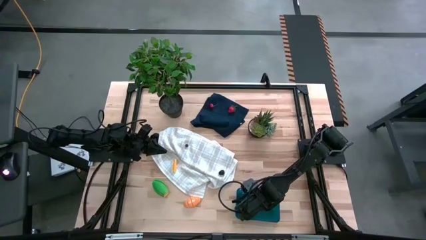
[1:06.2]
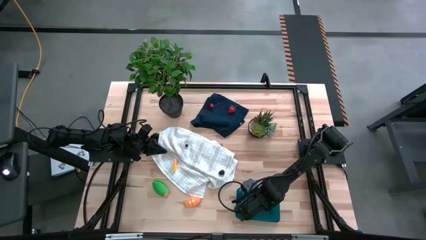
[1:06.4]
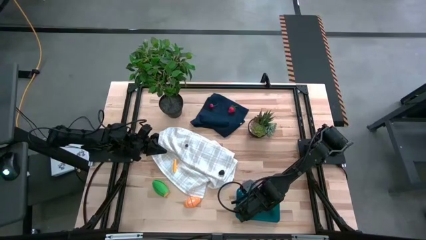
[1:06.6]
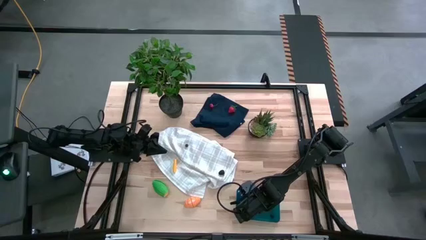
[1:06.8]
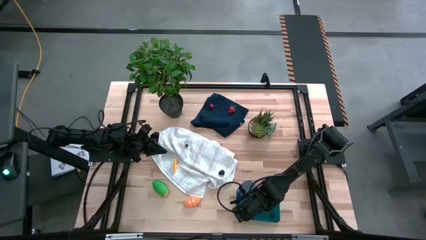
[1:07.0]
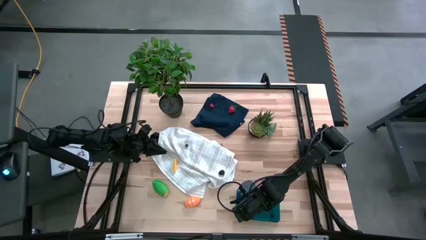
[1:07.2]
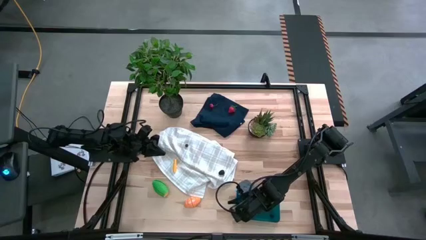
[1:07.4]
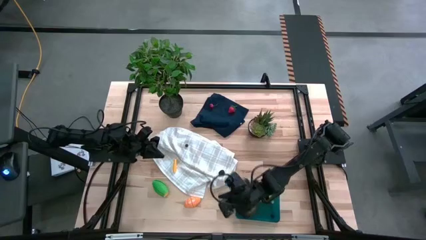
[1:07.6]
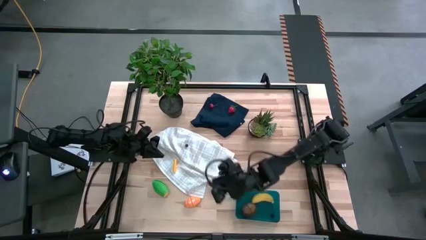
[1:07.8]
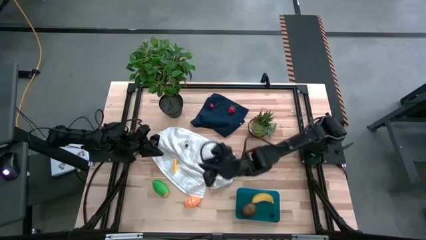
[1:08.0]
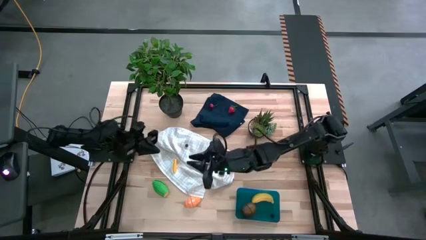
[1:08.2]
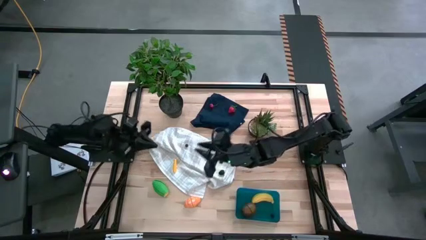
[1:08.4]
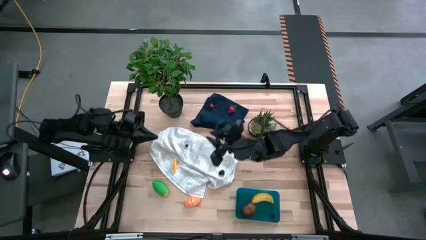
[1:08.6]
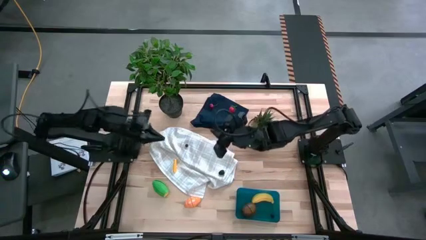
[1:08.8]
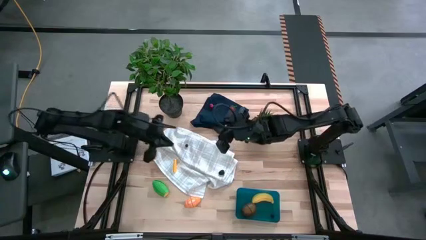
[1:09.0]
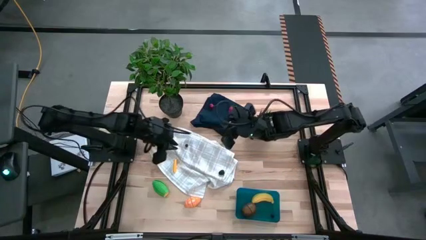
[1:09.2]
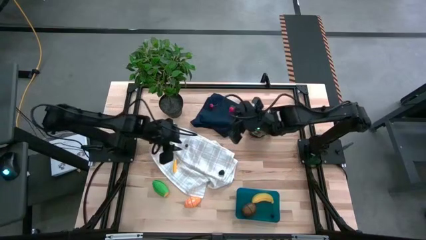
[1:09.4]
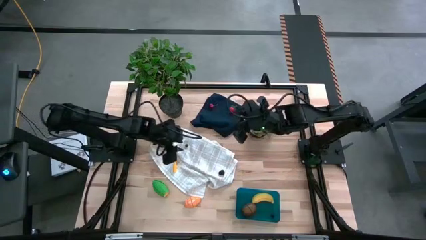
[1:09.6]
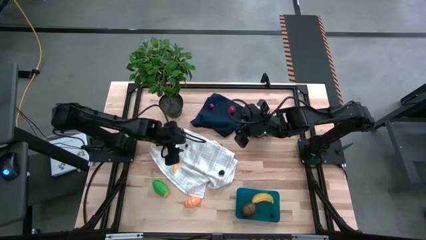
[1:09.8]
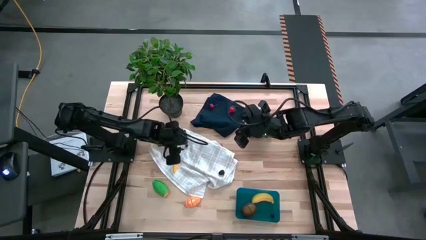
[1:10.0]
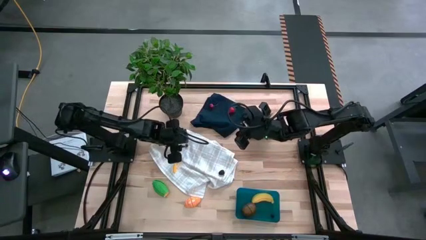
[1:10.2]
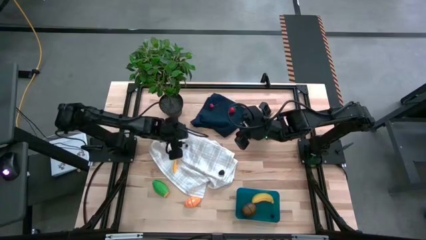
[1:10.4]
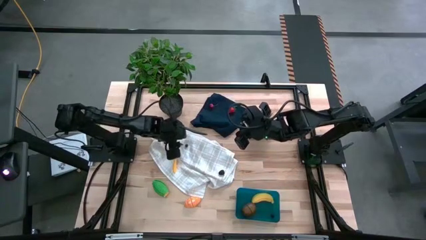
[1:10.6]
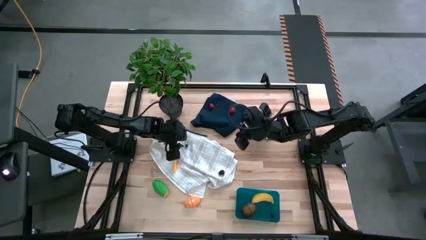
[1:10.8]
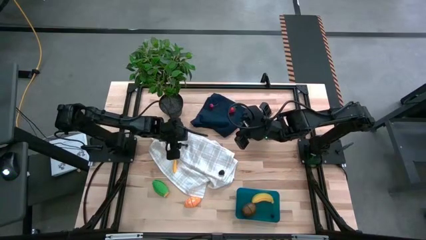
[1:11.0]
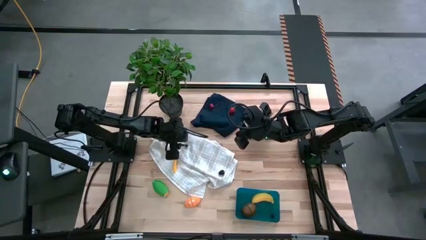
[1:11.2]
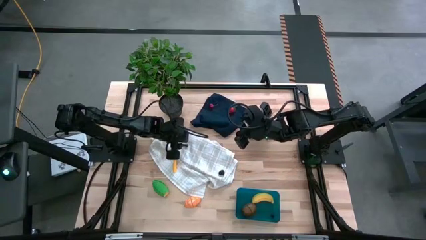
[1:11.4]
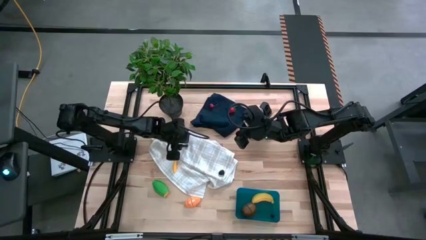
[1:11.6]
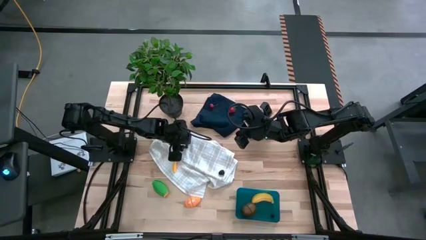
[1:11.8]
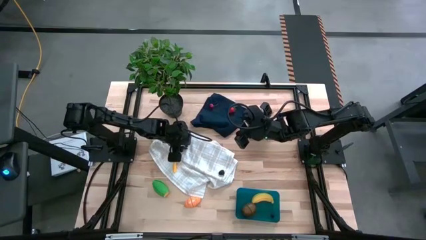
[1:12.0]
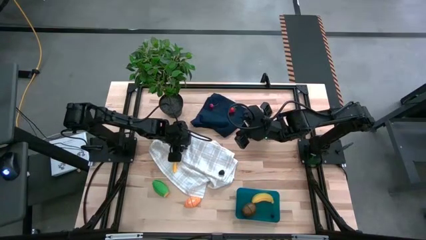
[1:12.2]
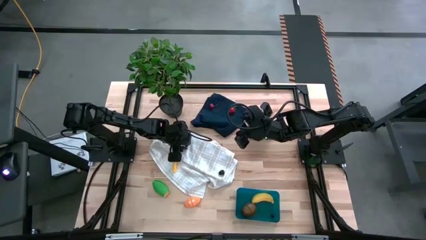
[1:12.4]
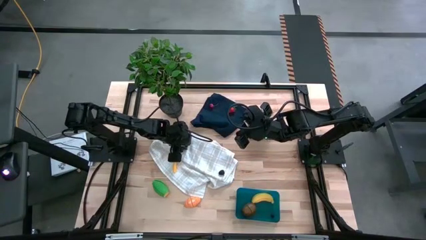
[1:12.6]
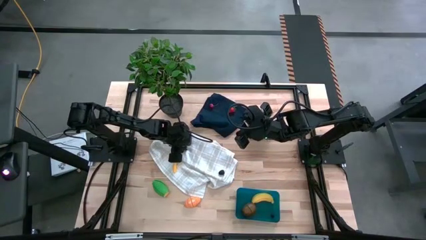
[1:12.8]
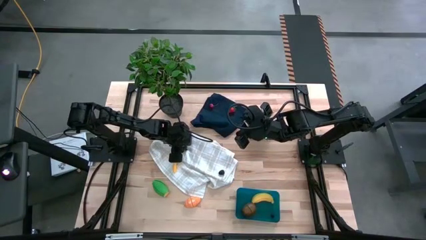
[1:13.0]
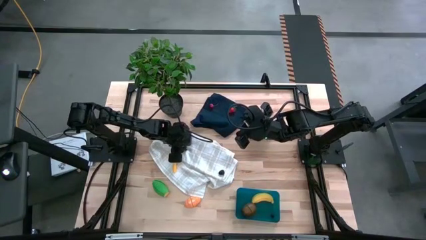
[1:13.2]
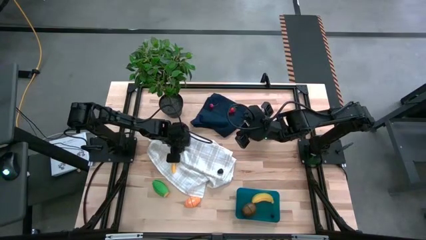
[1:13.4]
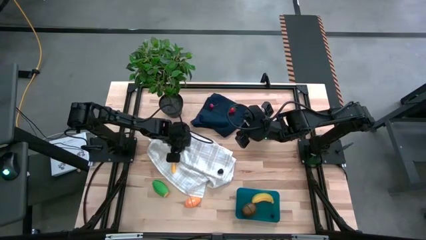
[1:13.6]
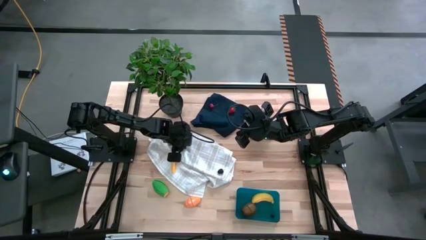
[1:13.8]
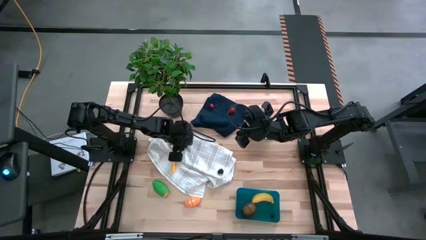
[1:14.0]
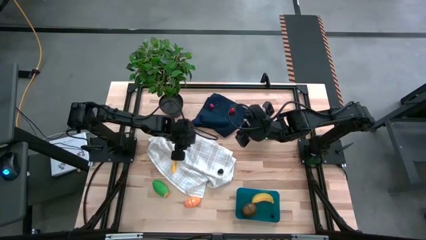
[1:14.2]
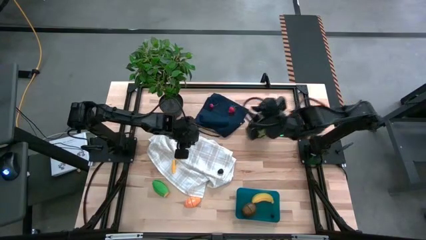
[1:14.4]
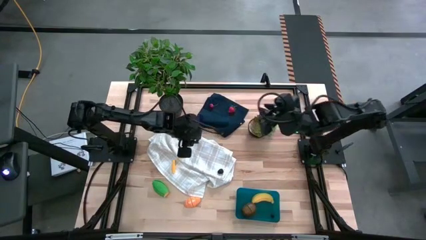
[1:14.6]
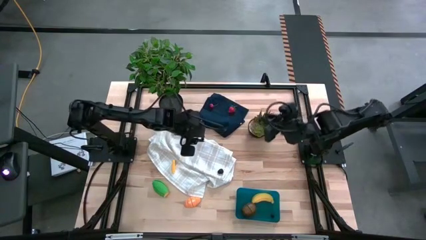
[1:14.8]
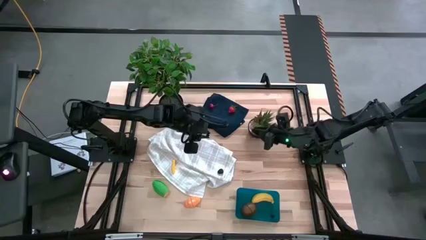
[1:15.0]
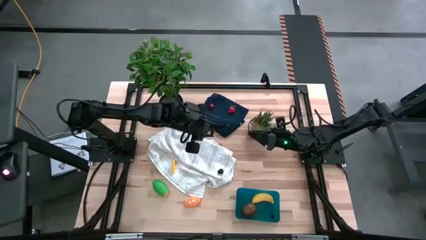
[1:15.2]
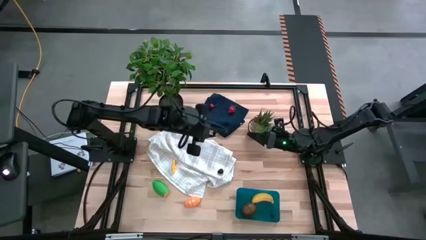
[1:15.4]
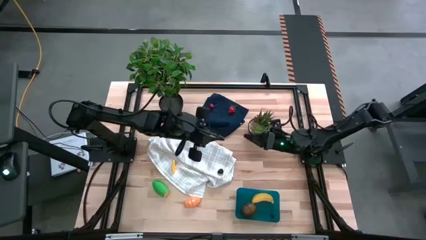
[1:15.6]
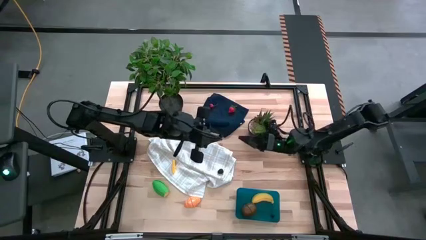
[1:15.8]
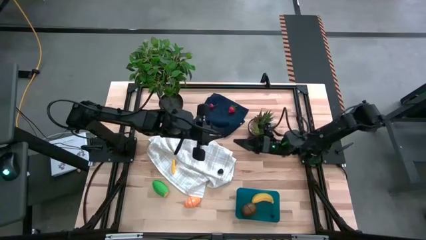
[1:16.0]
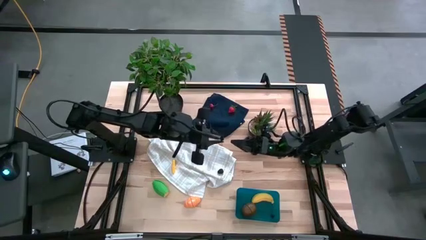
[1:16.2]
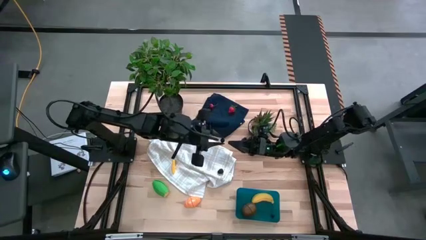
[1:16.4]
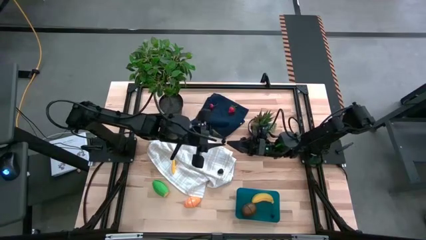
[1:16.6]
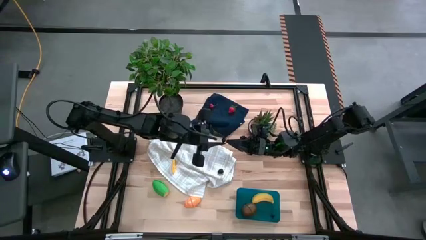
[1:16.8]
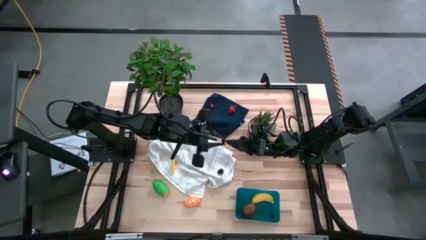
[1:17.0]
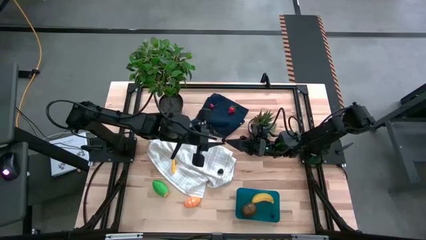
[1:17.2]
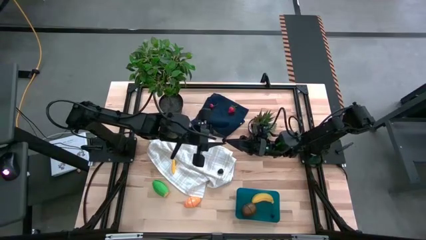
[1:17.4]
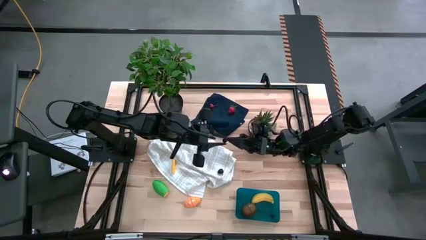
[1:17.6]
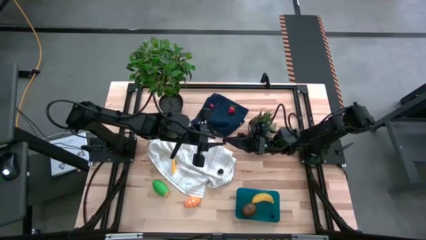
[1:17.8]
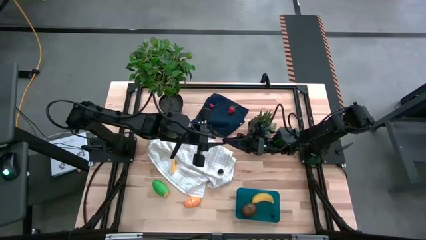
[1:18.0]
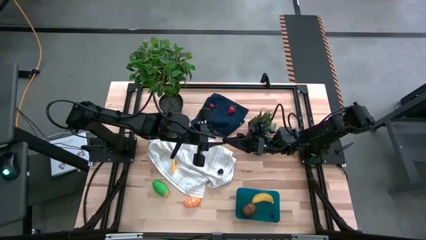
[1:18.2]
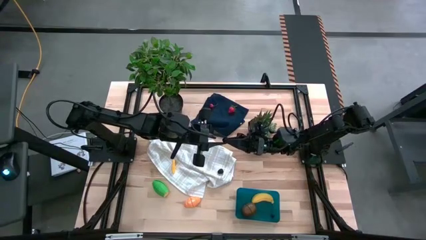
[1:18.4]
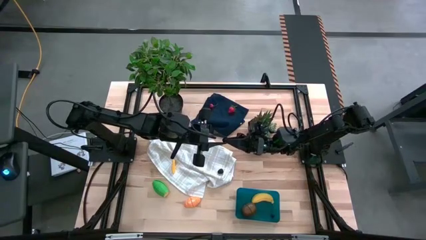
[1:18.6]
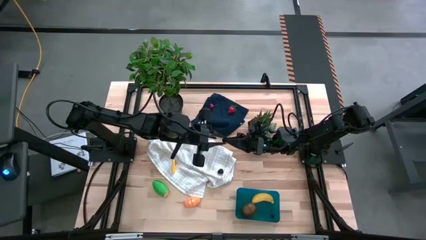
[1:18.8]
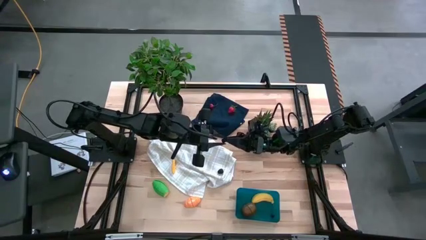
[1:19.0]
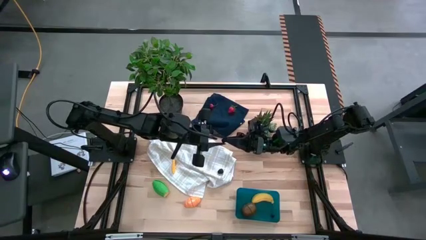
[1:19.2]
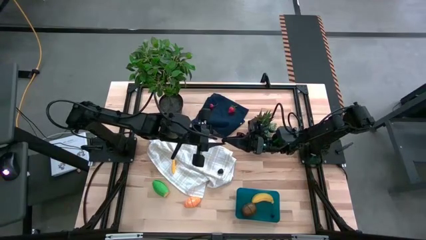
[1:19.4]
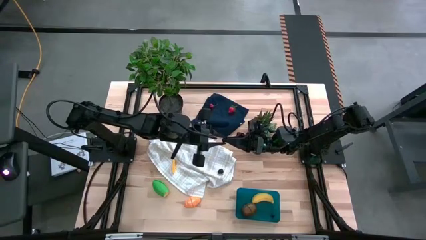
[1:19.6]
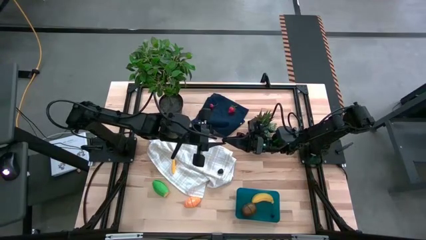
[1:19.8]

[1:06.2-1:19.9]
Task: Pick and placing Produce into tupperware
Put the blueberry into the bin

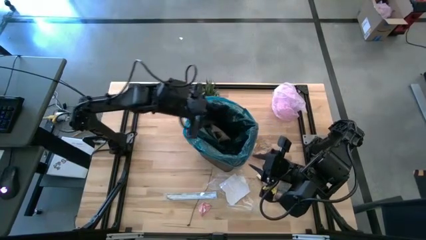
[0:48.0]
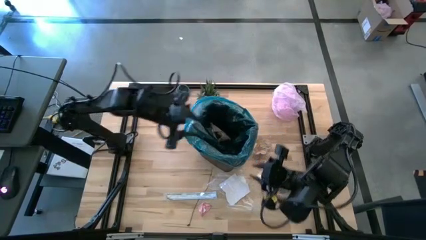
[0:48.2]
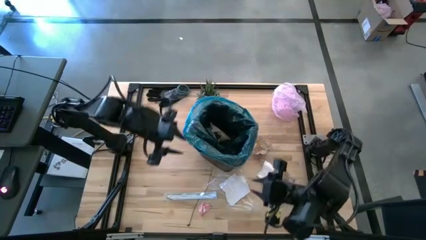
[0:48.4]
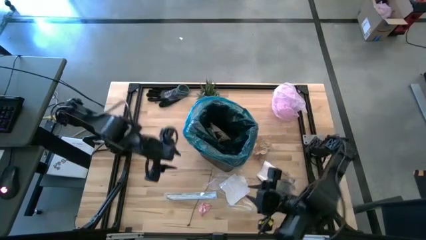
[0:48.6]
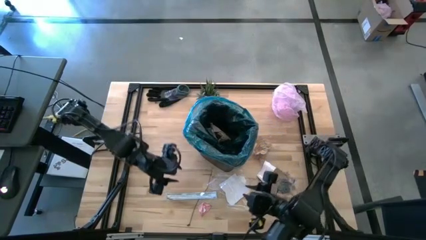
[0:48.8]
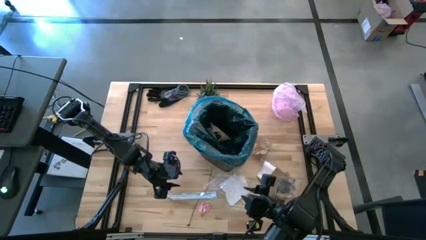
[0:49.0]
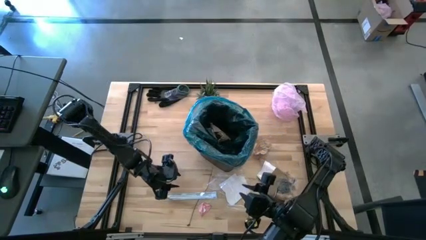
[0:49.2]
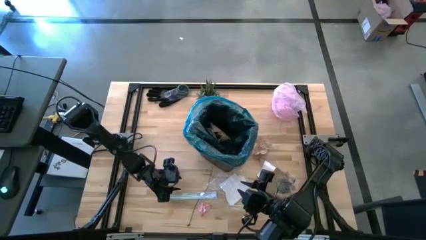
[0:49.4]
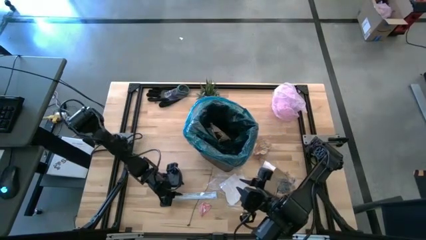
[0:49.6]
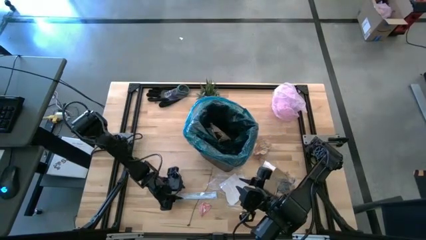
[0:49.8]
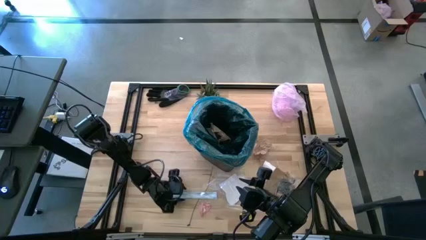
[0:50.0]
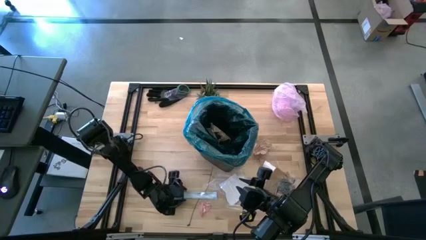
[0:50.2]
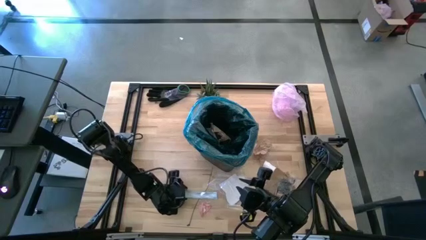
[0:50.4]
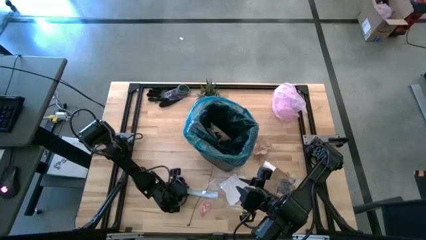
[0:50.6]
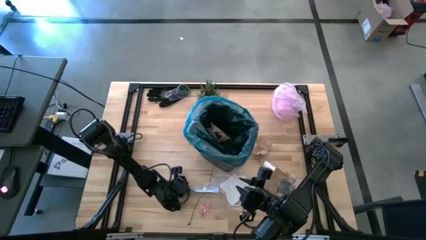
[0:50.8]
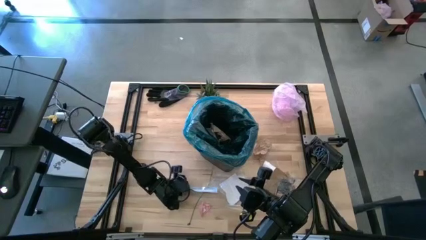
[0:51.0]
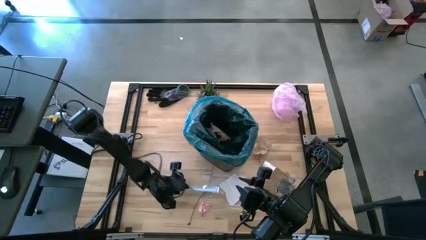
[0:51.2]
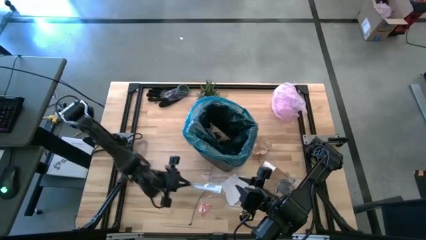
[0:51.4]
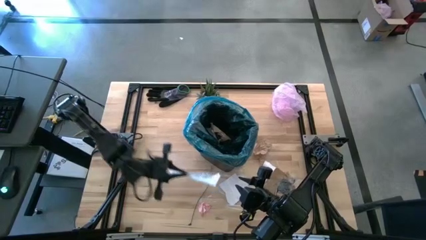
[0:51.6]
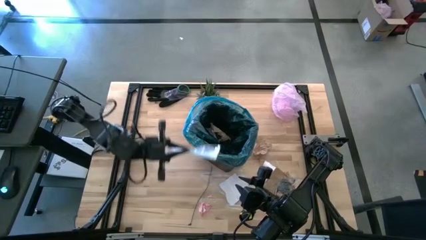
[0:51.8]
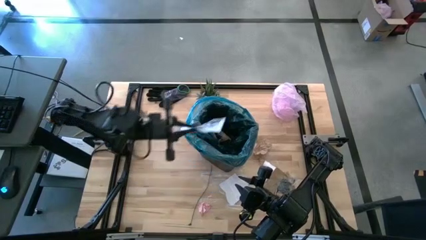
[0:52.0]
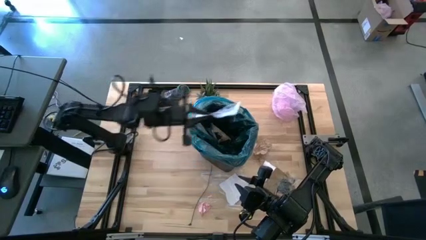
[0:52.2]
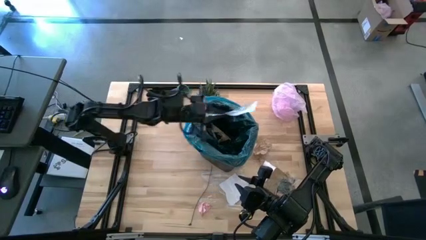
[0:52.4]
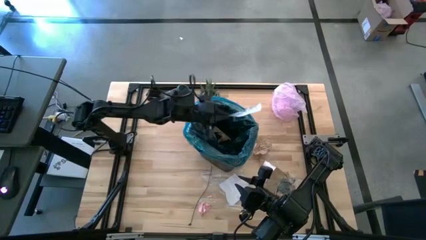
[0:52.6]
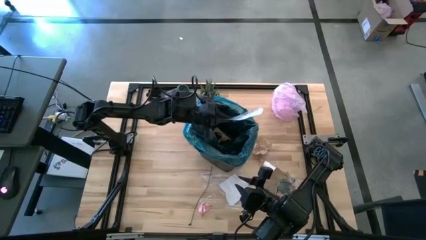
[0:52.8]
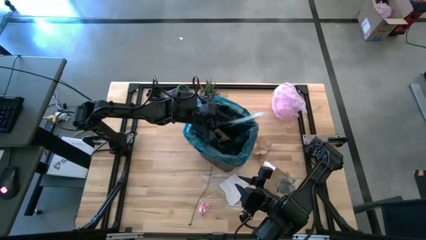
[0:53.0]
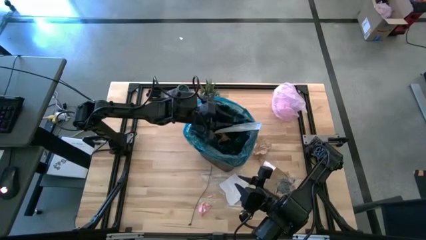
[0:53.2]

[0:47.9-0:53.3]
Task: place trash/remove bag and relplace
Put the white plastic into the trash bin
